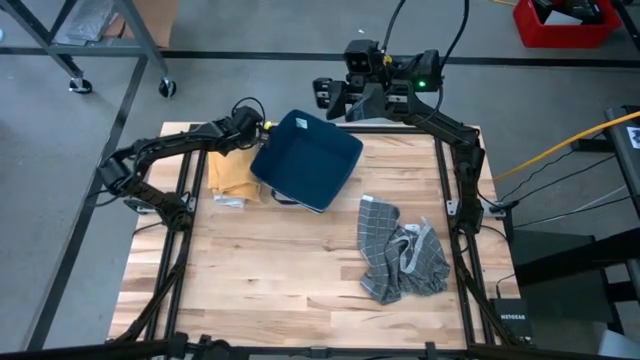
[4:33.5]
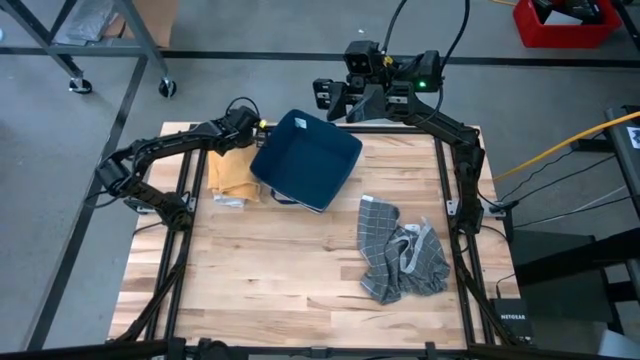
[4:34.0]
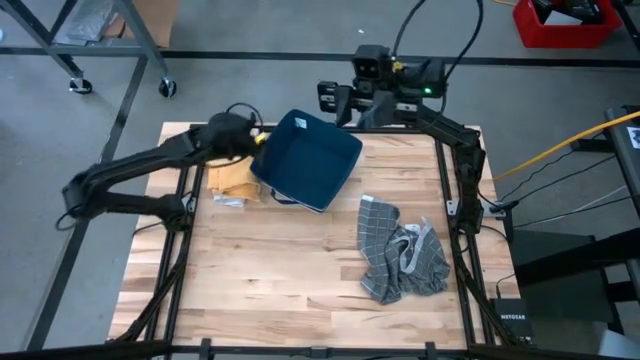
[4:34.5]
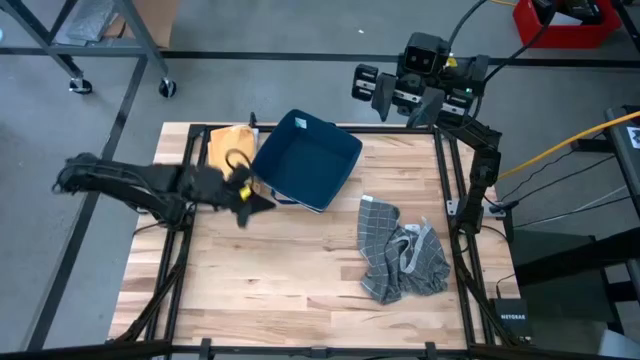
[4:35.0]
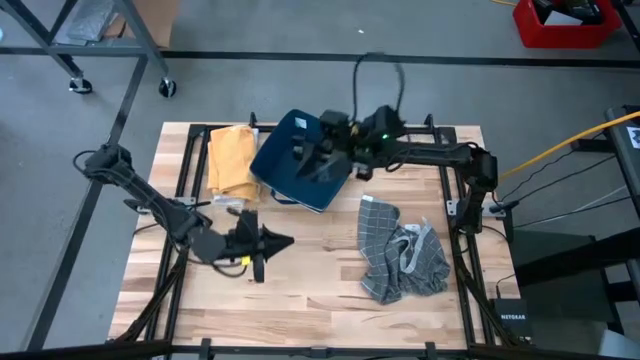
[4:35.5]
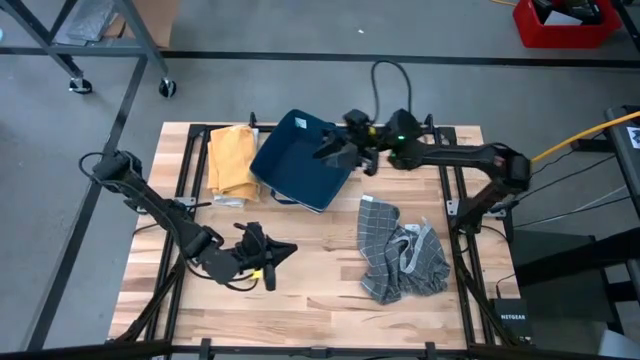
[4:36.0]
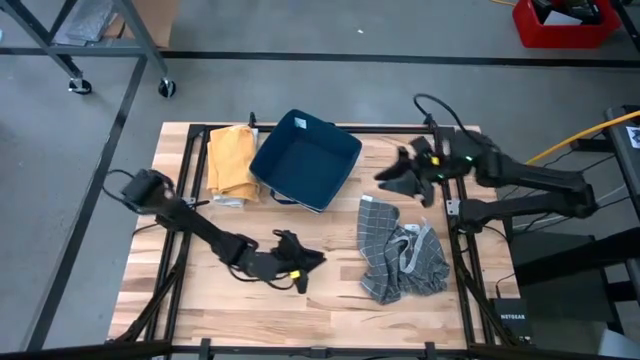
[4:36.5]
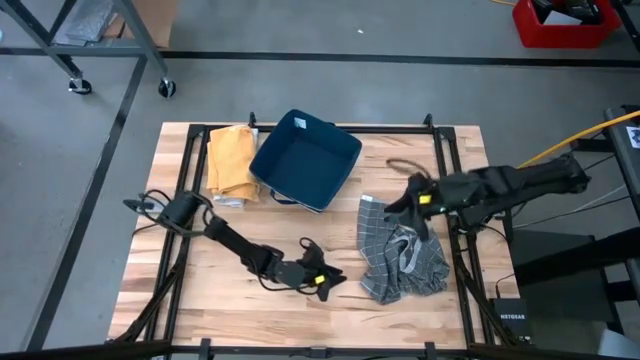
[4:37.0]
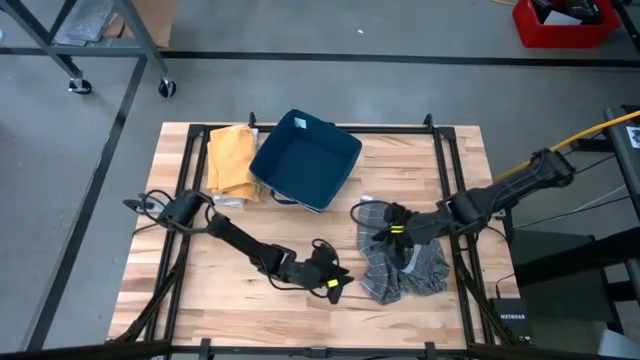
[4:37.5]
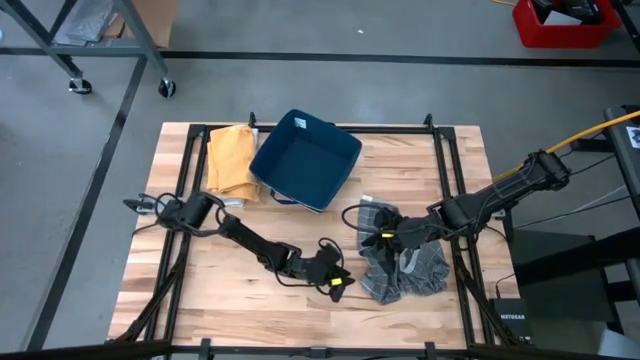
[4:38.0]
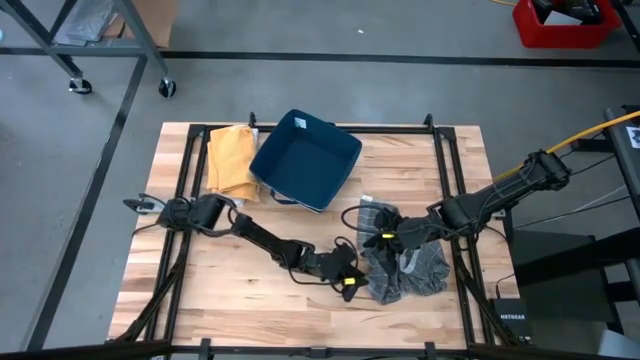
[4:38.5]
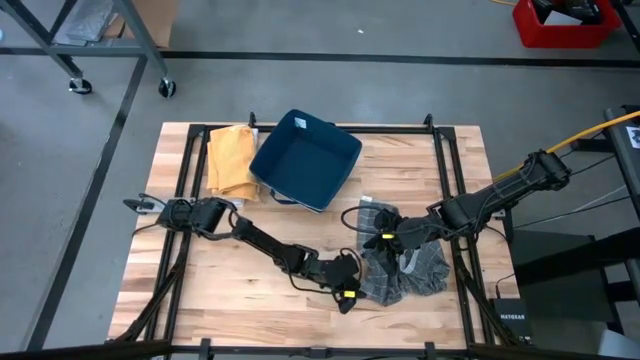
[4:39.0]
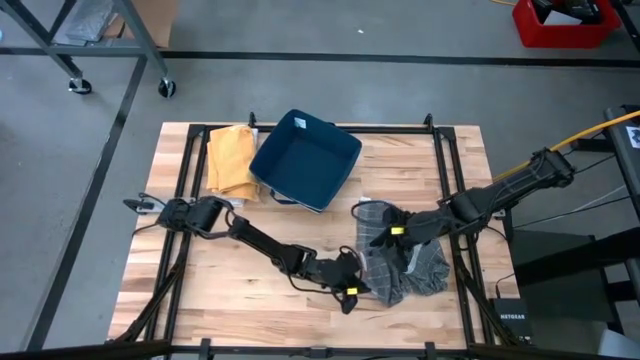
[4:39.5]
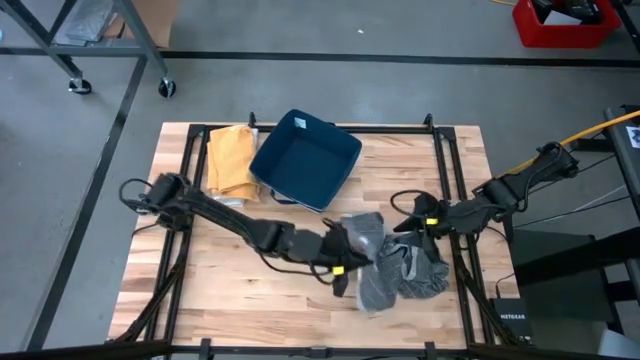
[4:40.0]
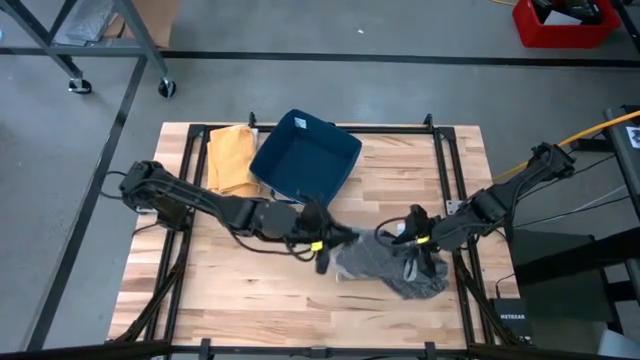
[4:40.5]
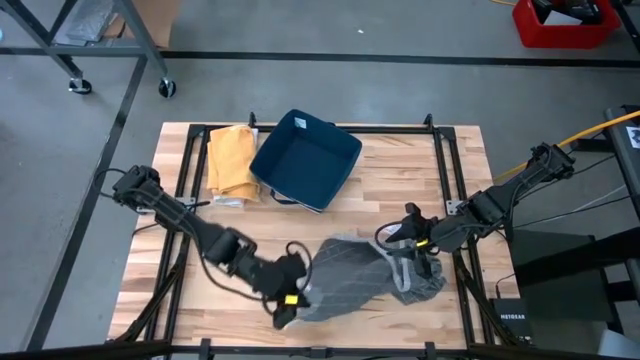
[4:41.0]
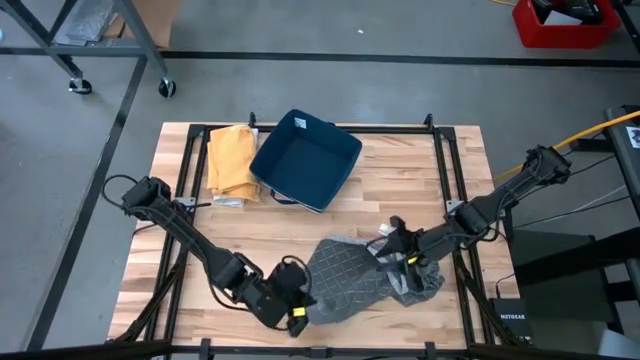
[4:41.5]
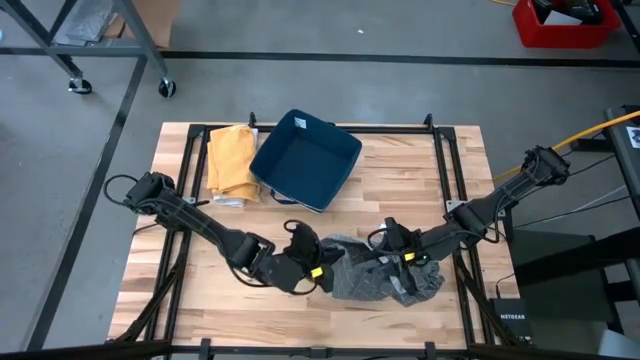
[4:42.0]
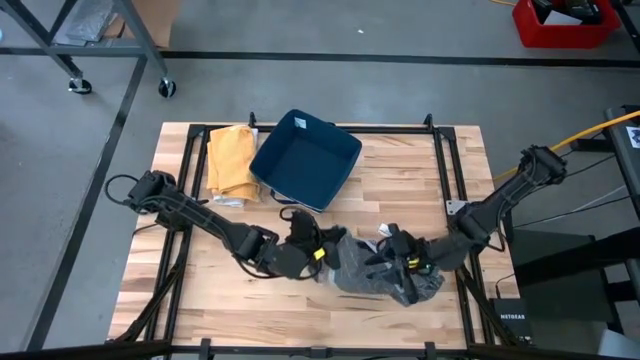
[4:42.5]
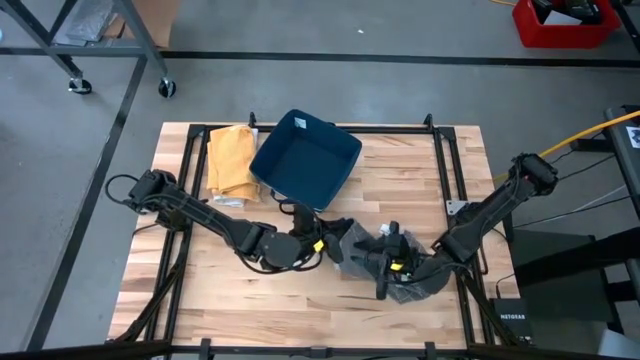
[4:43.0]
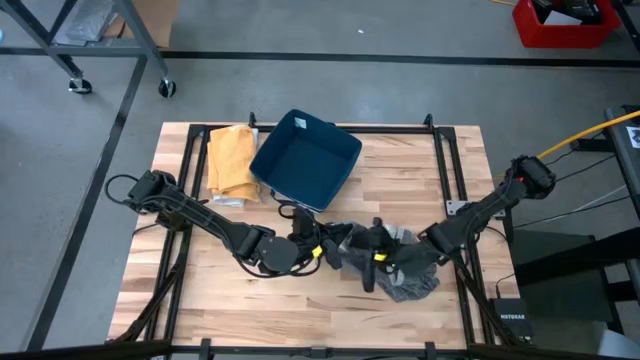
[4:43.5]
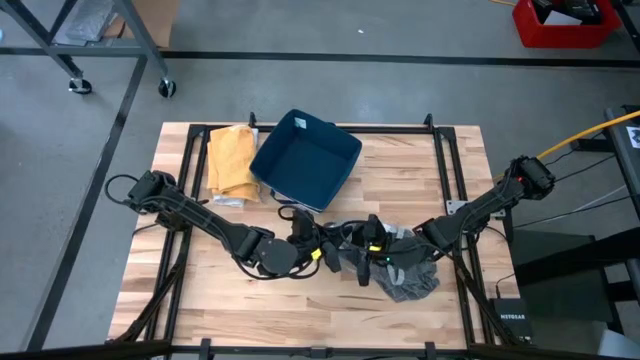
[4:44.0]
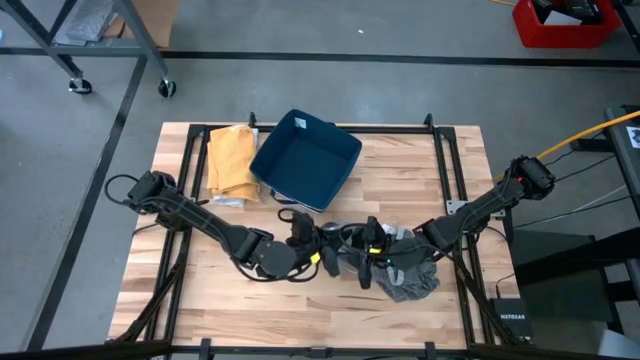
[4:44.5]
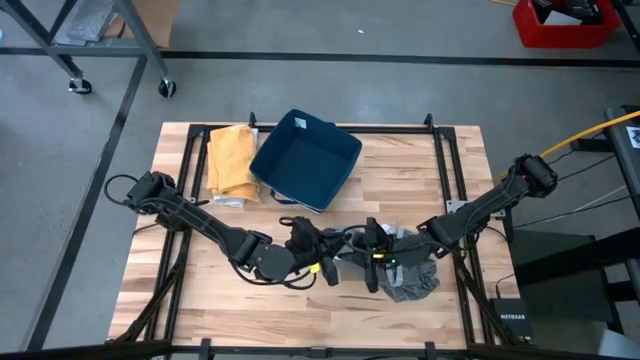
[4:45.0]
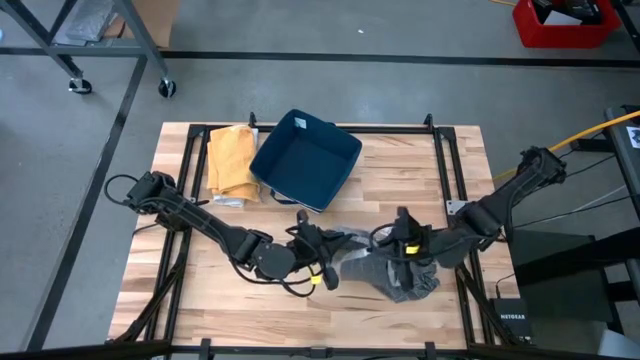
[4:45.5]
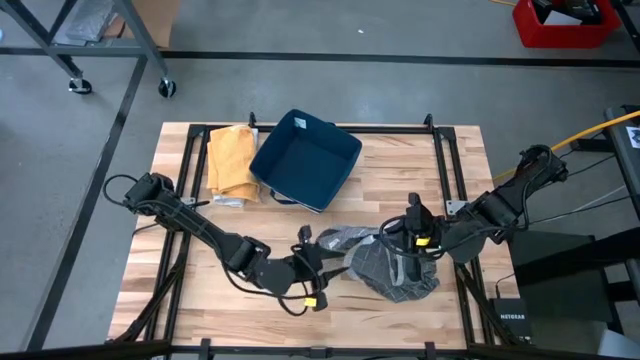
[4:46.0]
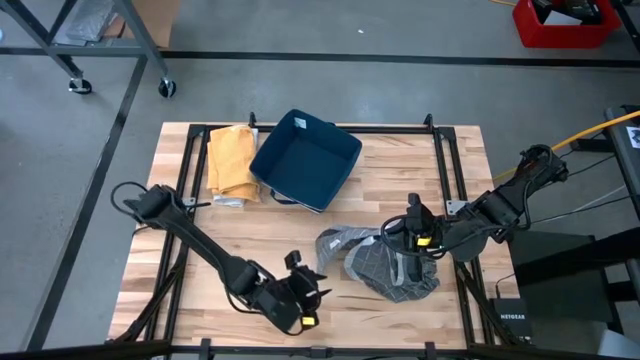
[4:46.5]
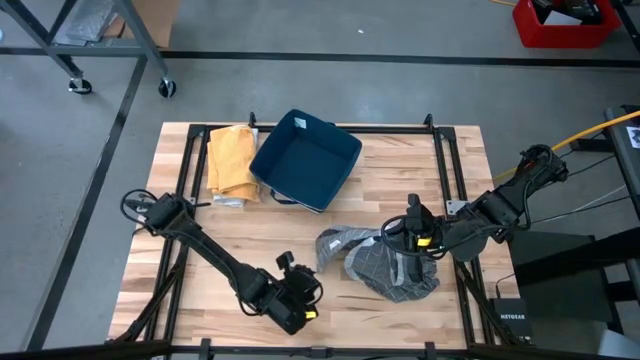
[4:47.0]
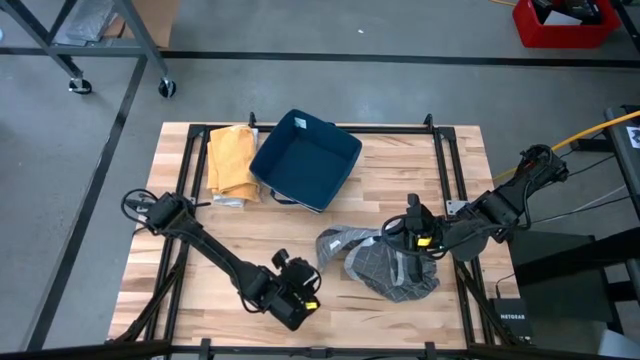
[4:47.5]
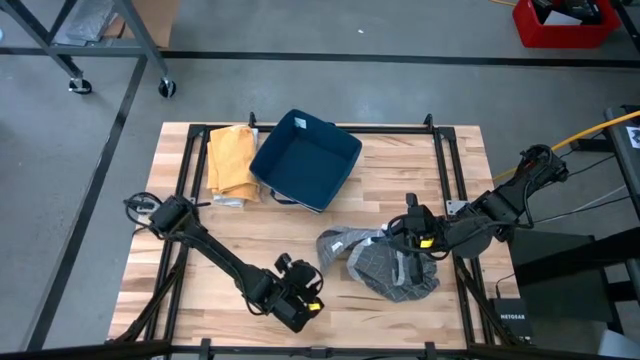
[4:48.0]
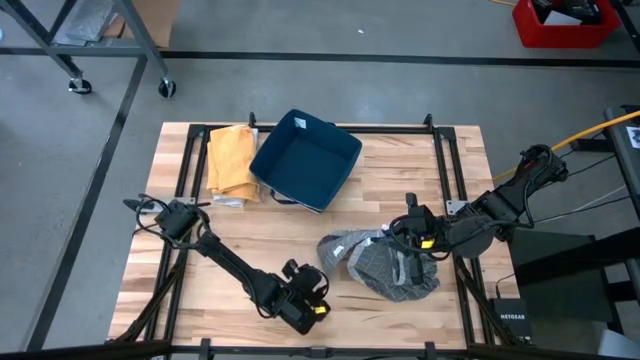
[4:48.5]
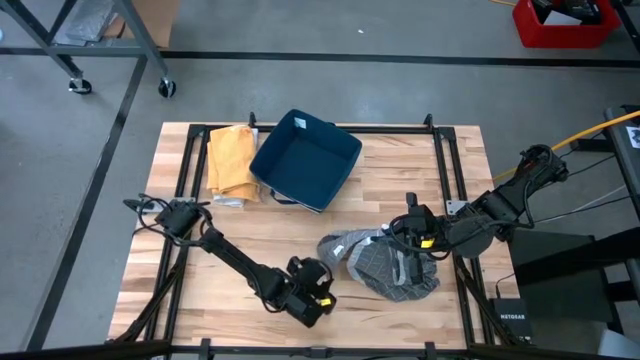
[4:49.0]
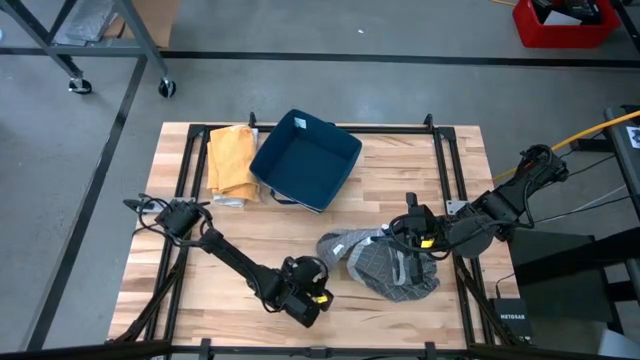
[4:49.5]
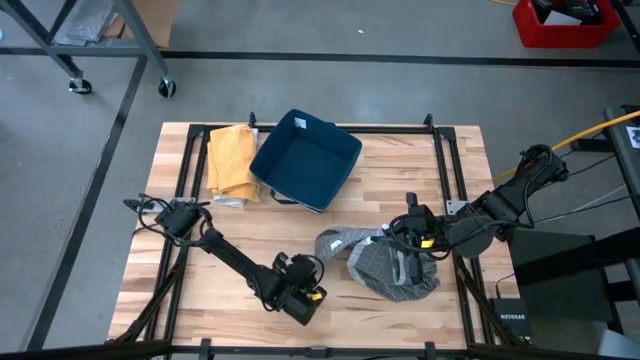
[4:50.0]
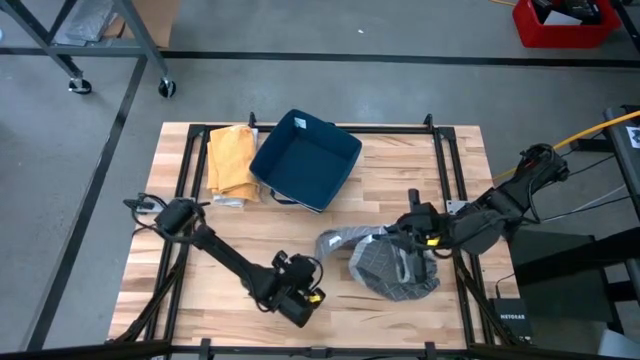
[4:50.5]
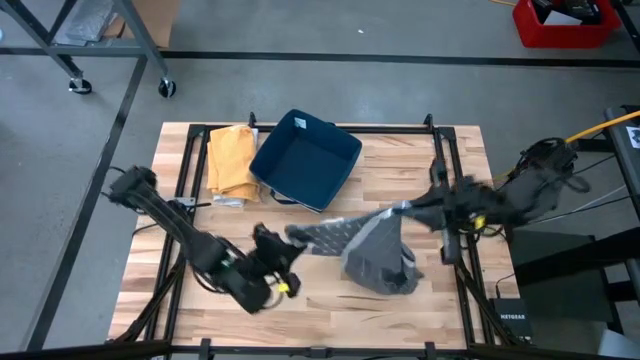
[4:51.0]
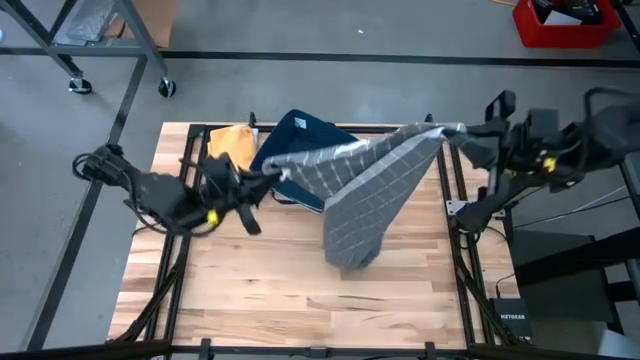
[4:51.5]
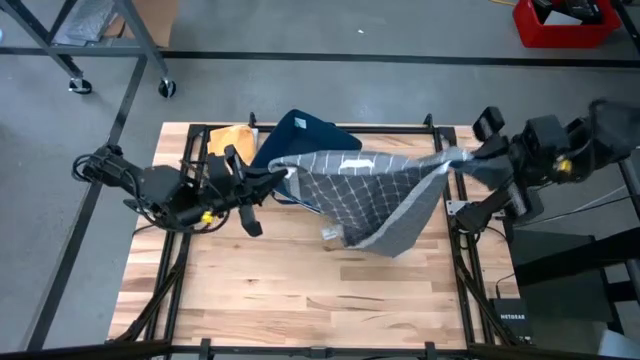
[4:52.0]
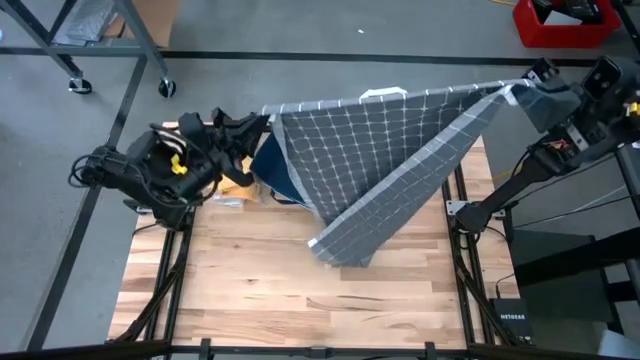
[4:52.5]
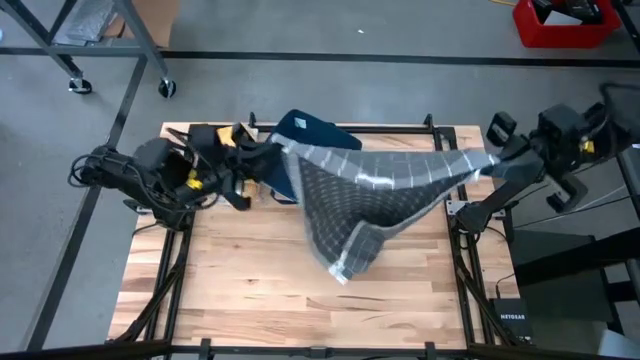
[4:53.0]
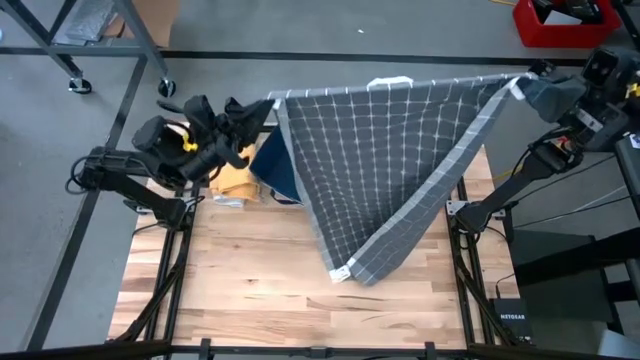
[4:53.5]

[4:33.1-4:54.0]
Task: Fold towel
Fold the gray patterned towel
